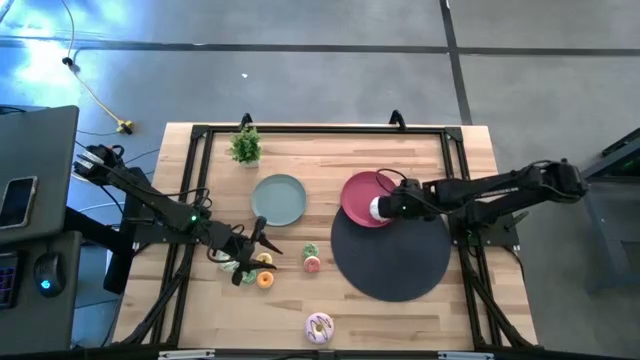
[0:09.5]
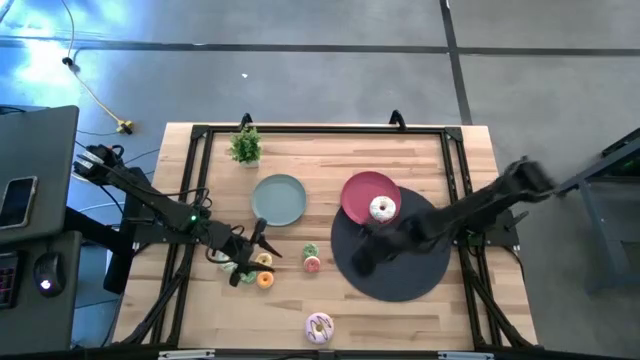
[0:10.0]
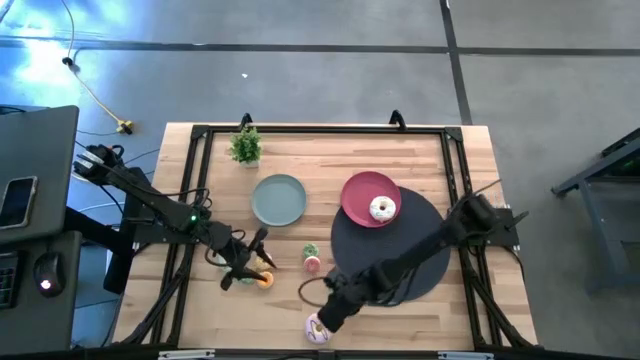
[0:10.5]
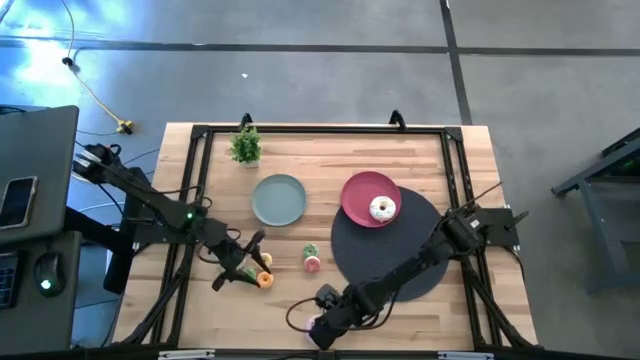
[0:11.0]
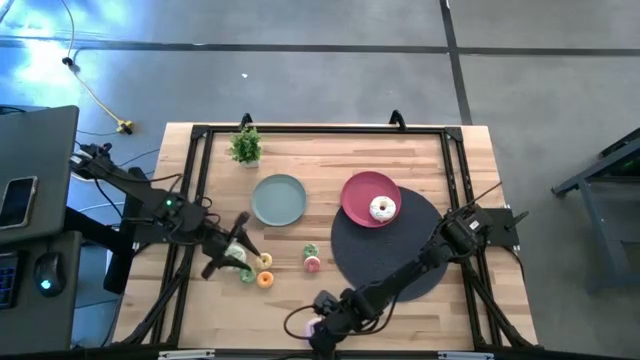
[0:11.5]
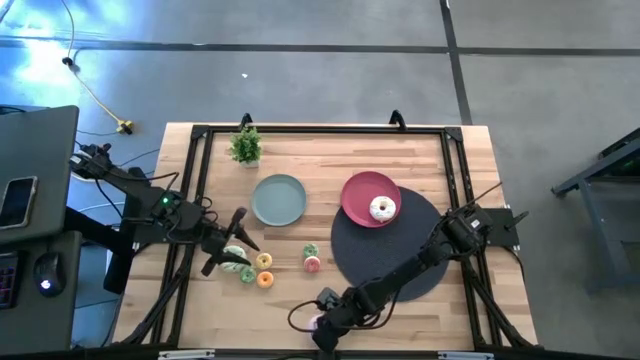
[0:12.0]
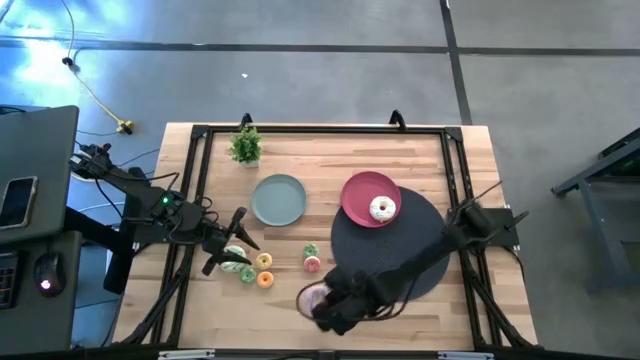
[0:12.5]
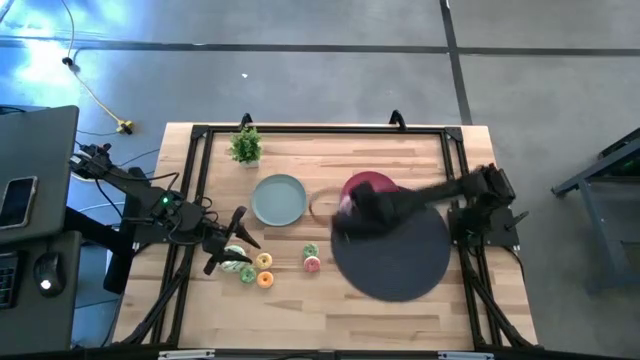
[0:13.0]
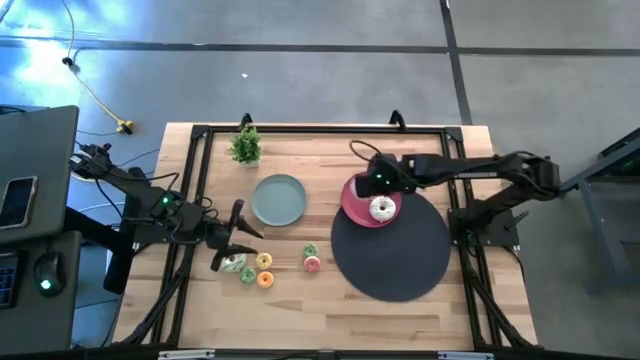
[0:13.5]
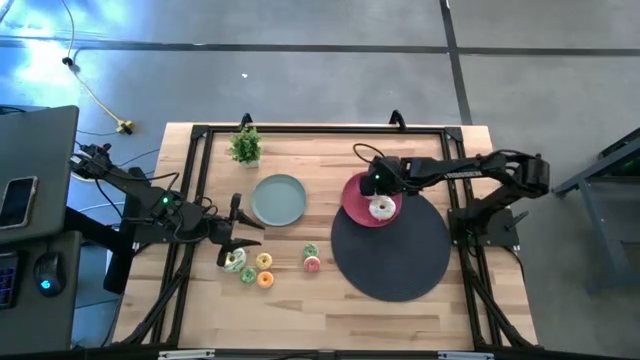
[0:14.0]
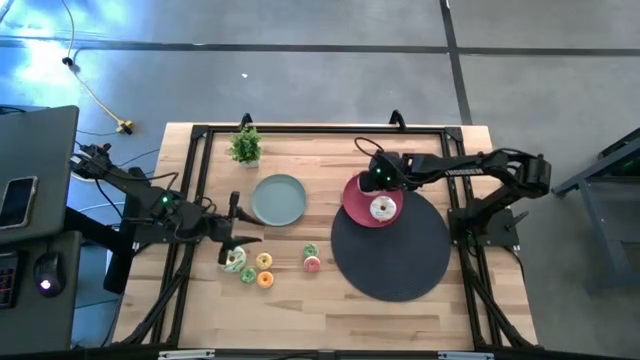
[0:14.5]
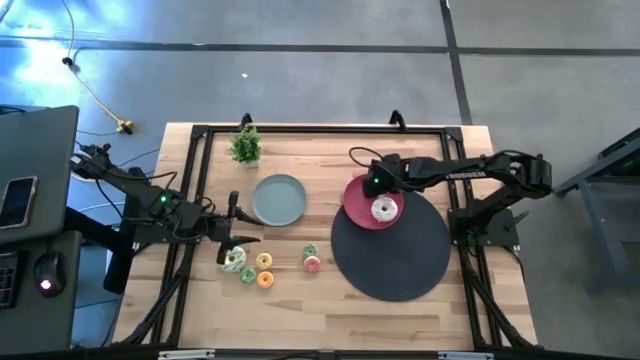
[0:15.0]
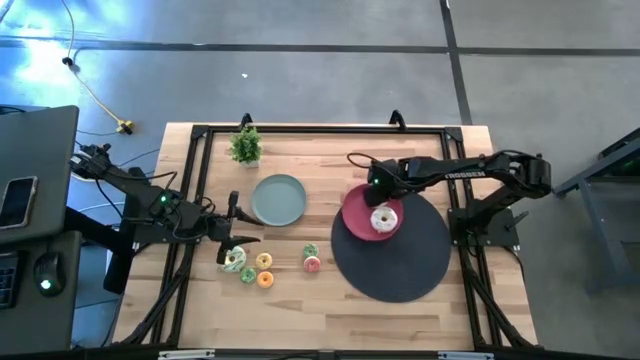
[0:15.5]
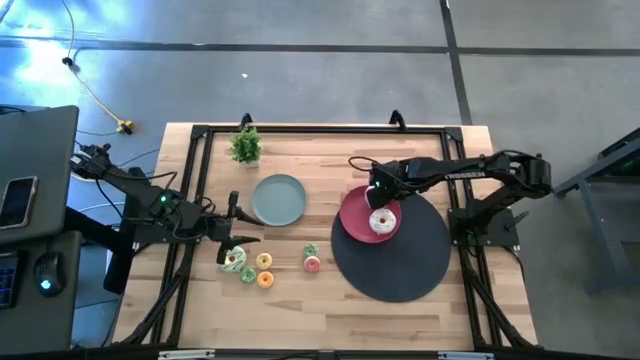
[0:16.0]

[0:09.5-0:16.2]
Task: Pick & Place donuts
Put the large purple donut on the red plate

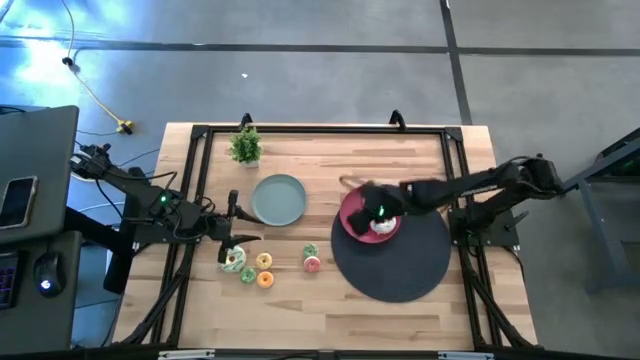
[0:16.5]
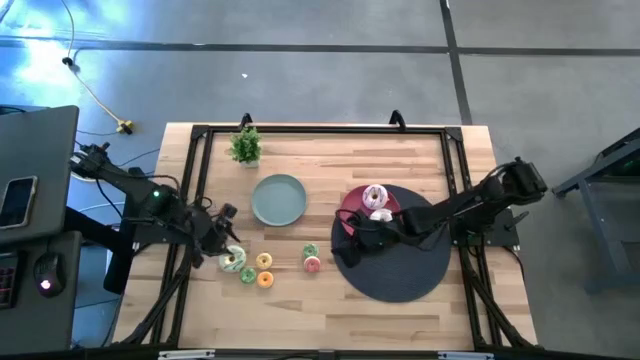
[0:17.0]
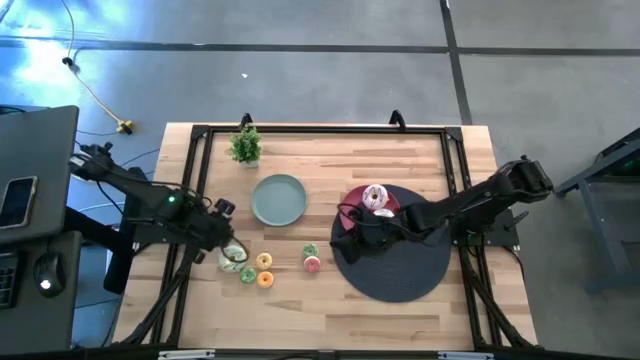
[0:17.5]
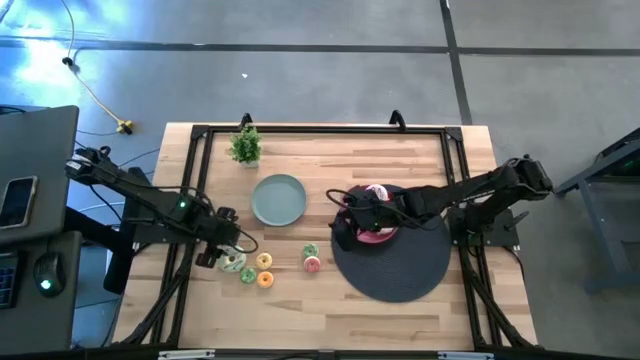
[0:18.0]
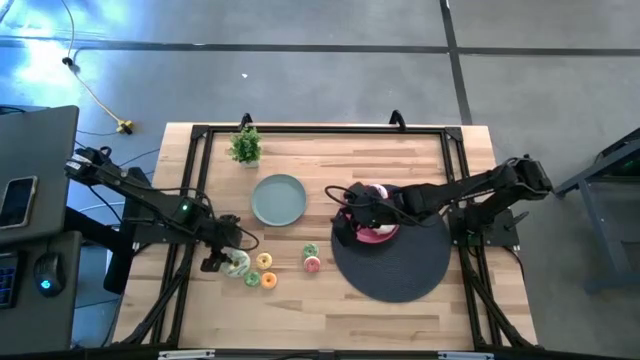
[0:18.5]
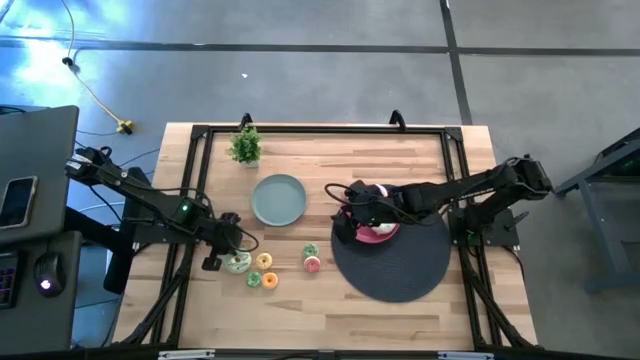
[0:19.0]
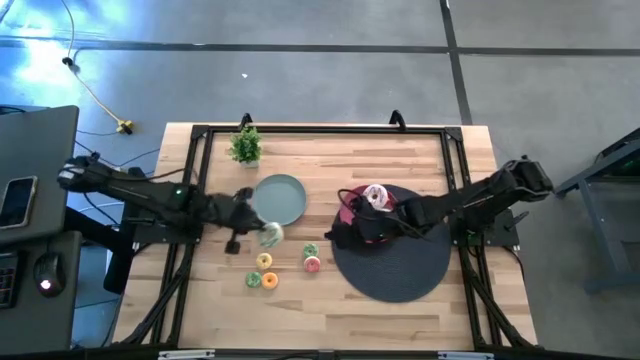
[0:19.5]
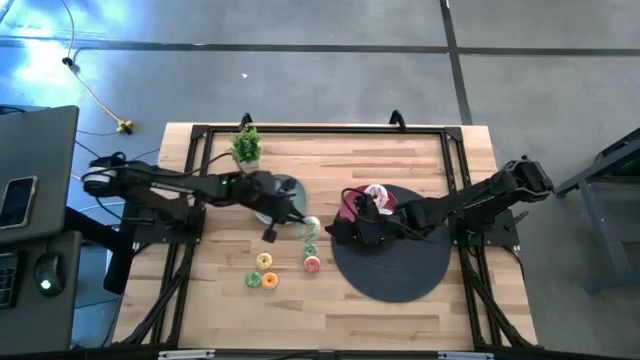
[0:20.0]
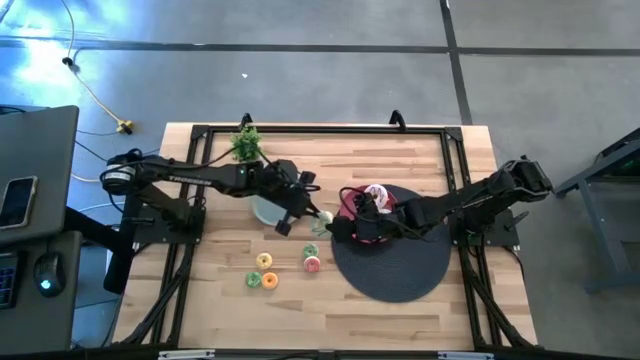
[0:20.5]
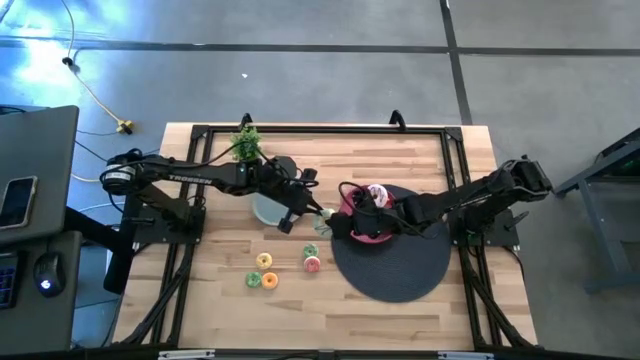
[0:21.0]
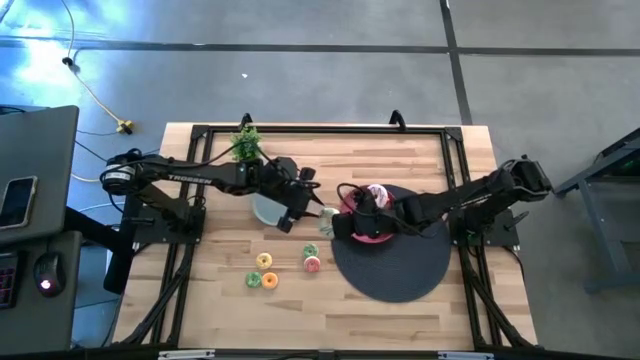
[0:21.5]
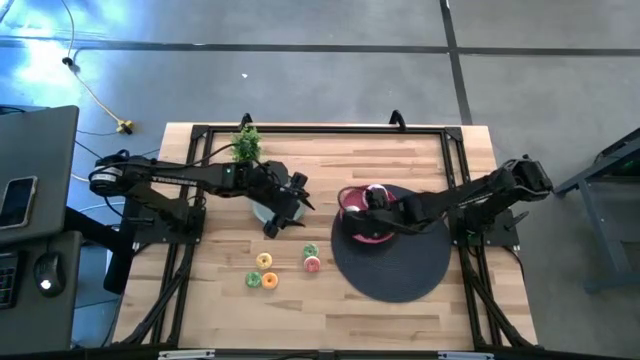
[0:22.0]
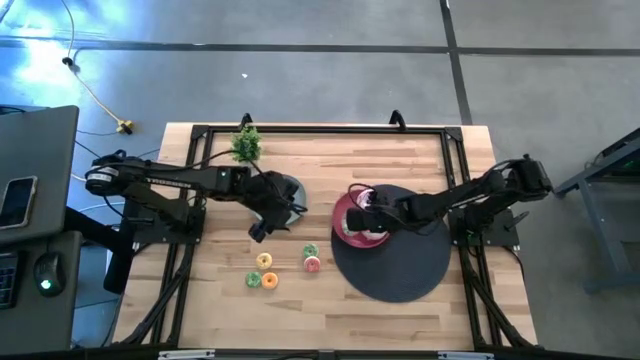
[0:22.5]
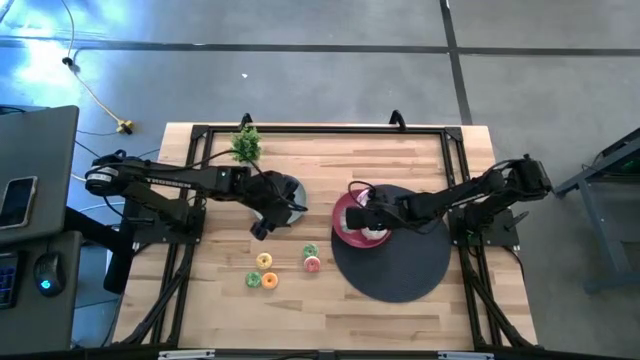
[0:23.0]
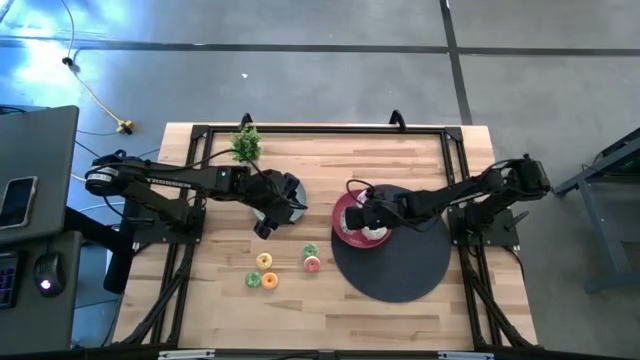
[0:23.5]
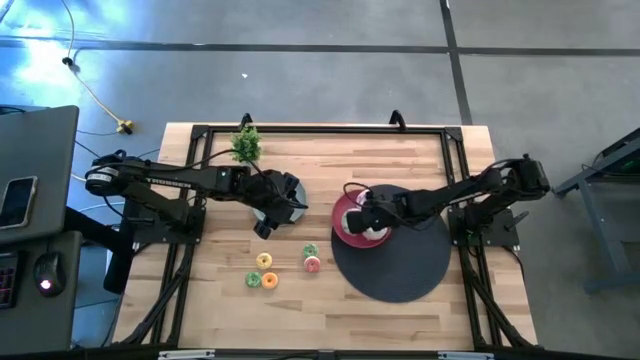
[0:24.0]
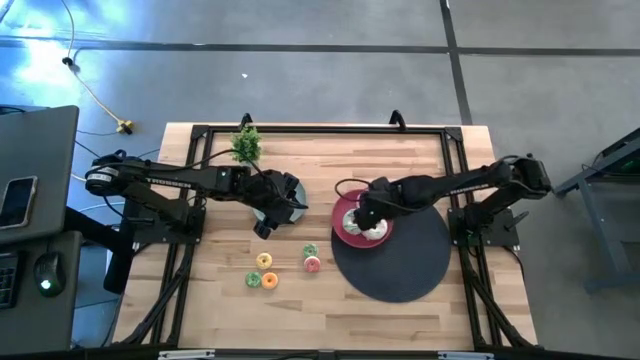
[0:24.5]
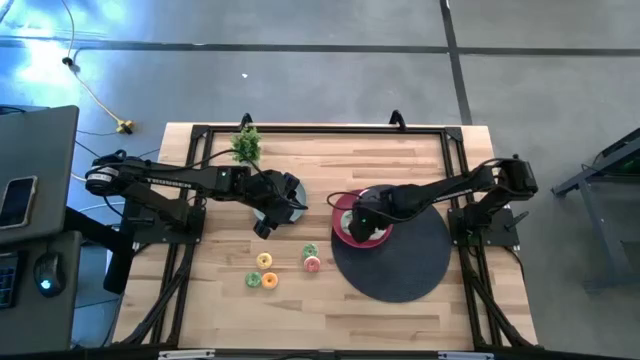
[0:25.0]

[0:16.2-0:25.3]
Put the large blue donut on the red plate

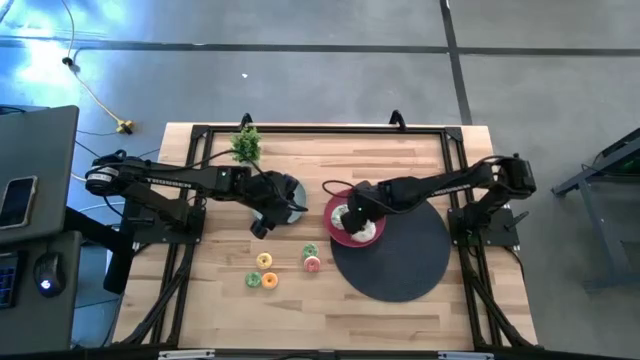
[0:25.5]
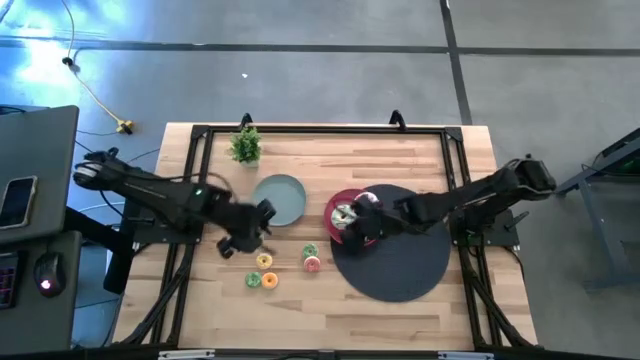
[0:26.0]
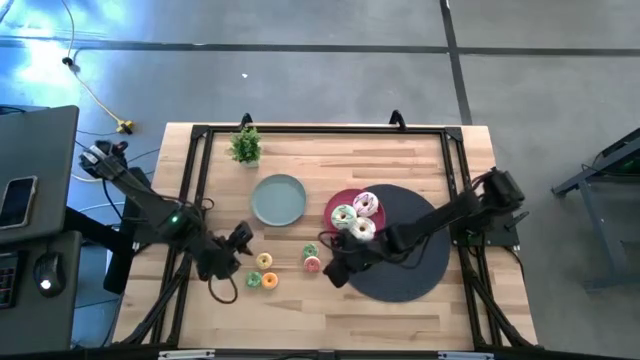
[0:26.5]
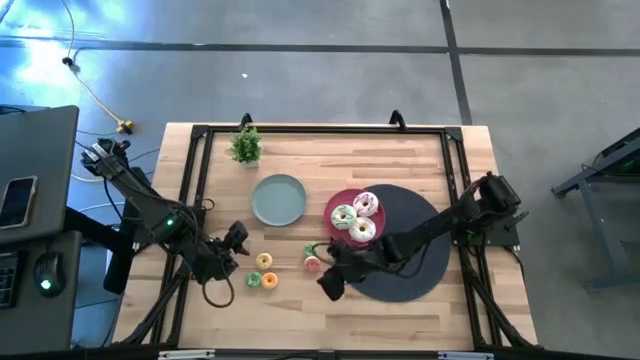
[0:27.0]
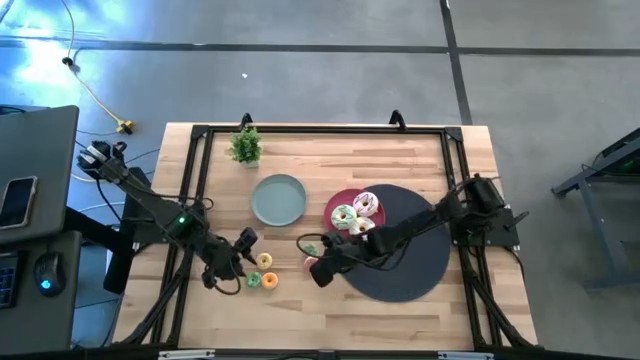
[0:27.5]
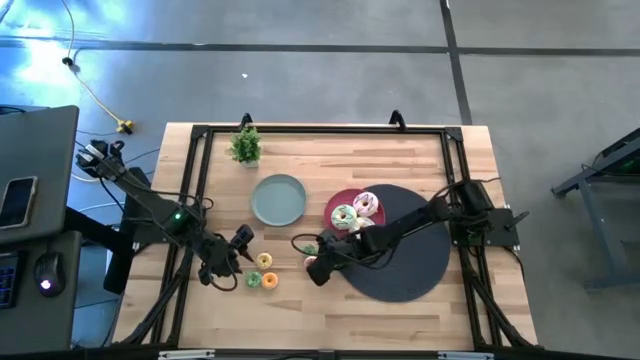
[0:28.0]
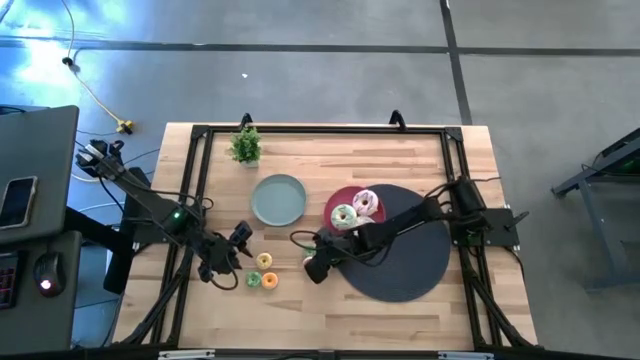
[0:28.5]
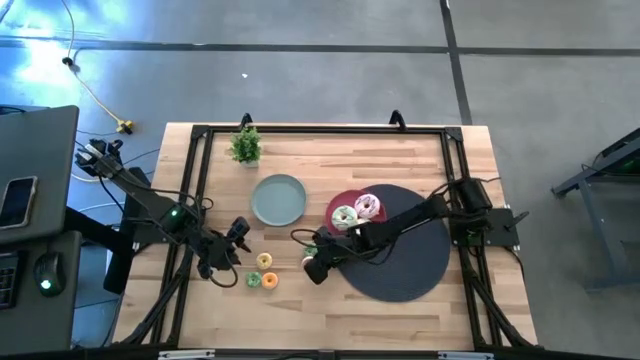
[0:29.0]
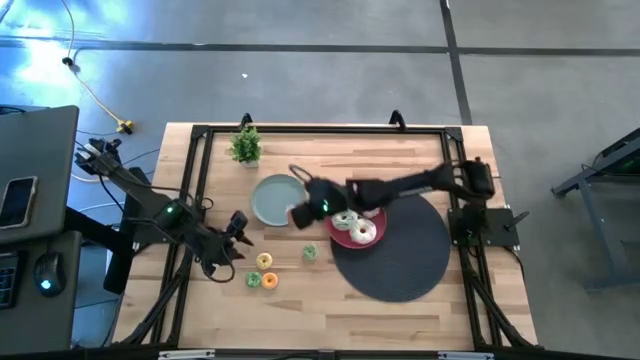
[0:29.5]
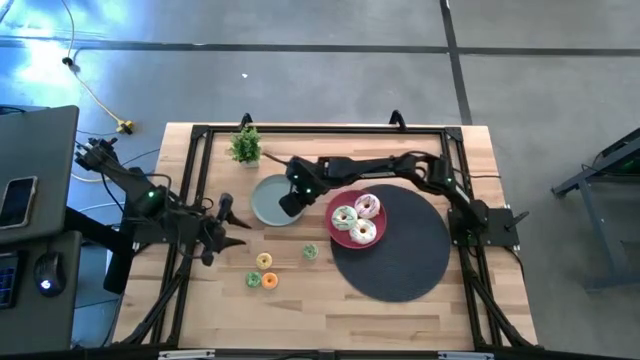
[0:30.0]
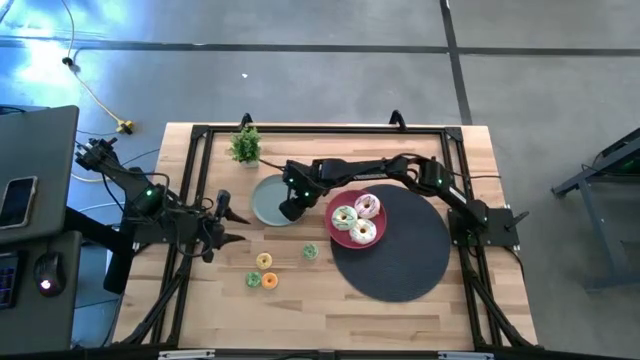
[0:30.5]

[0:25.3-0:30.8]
Put the small red donut on the blue plate
